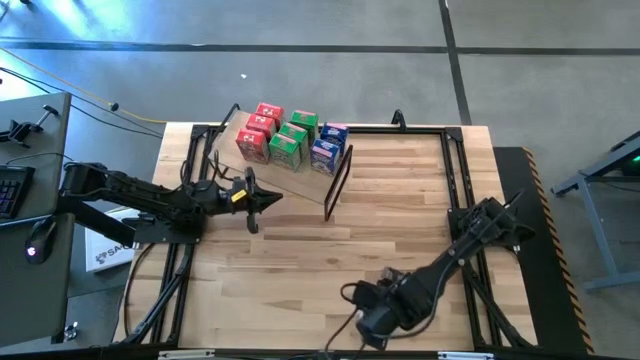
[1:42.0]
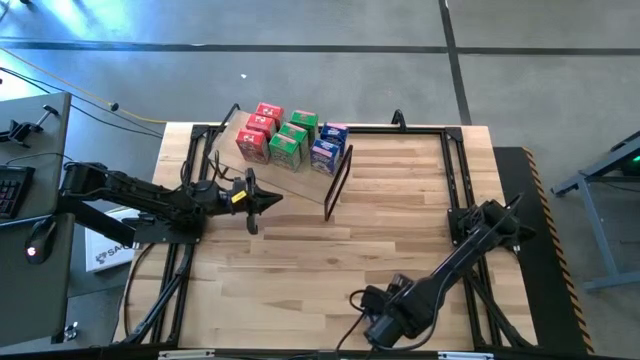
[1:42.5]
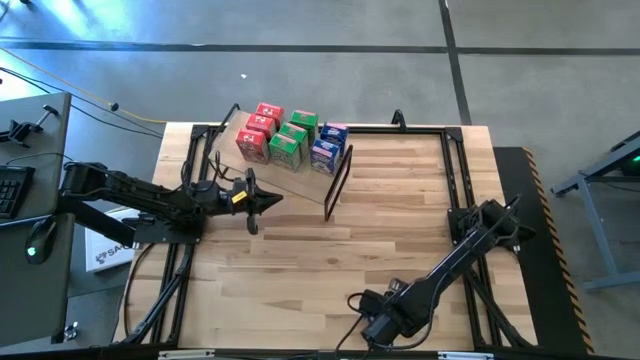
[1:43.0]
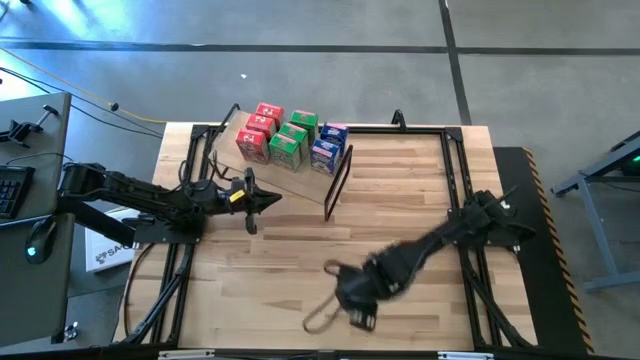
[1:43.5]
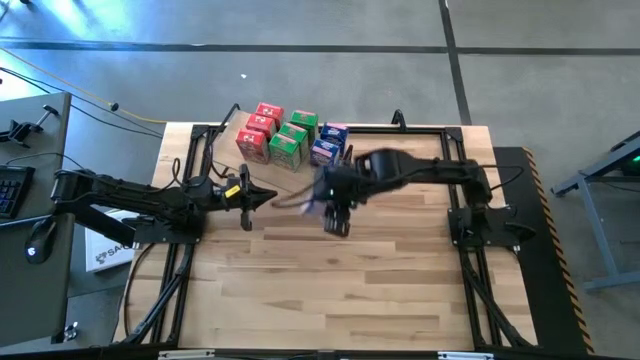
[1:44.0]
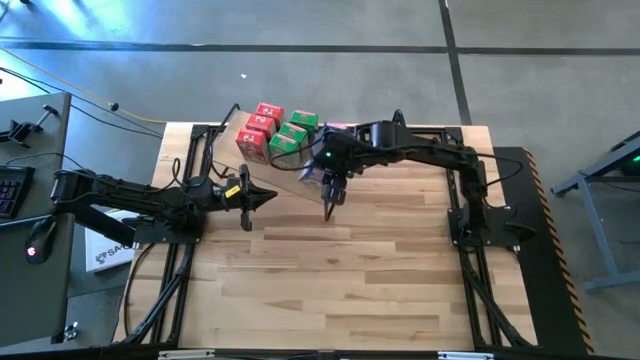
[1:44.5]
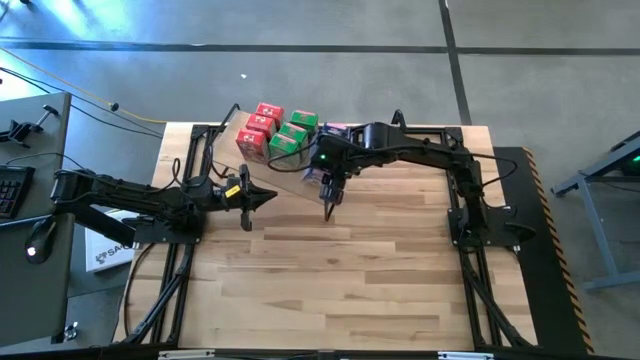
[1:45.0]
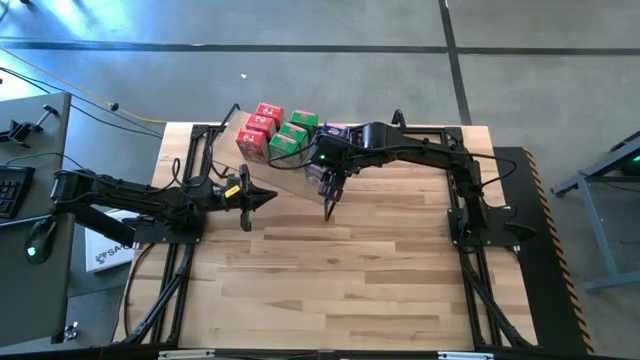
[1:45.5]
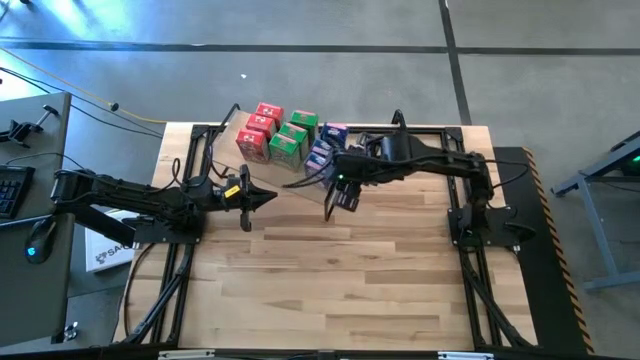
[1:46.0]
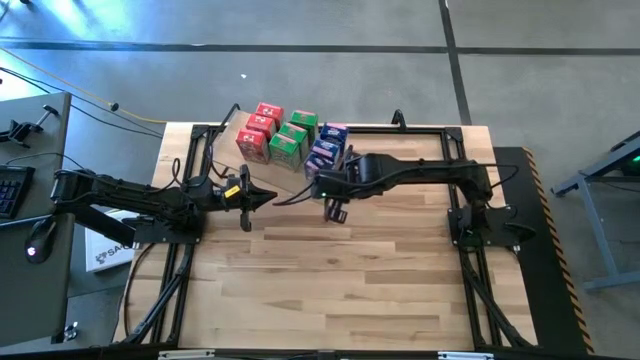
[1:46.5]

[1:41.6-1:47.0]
Task: Stack cereal on shelf
Put the blue cereal box on the shelf aligned with the other blue cereal box

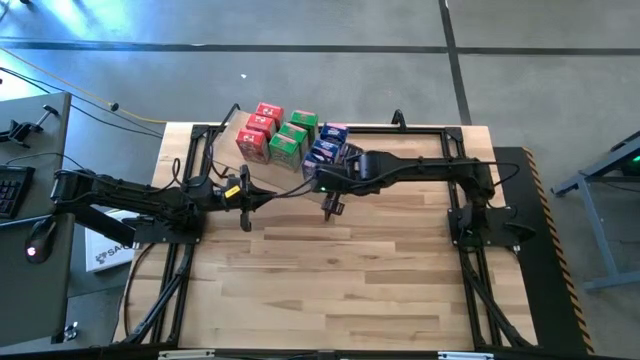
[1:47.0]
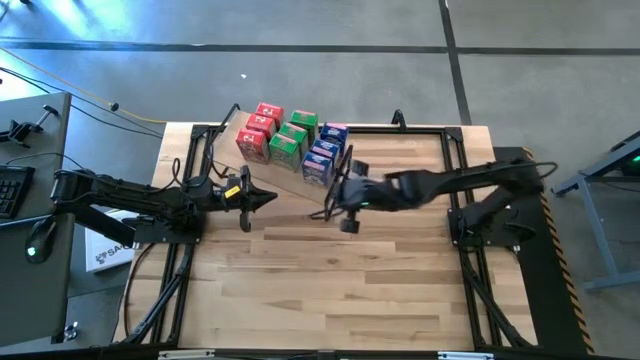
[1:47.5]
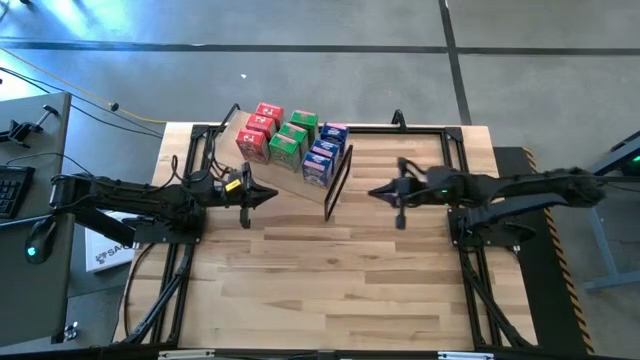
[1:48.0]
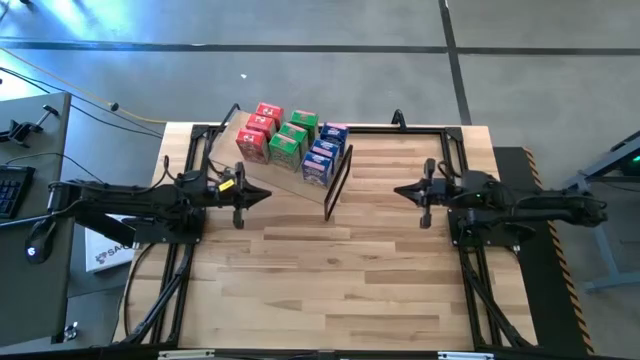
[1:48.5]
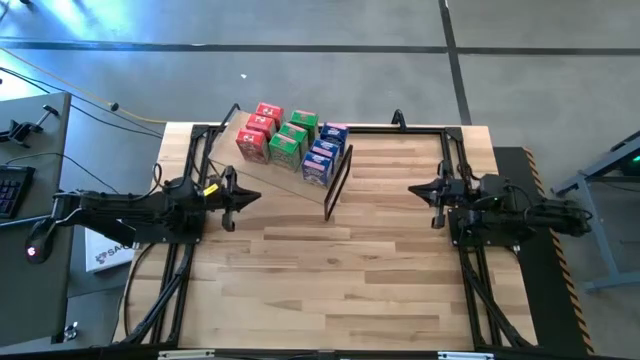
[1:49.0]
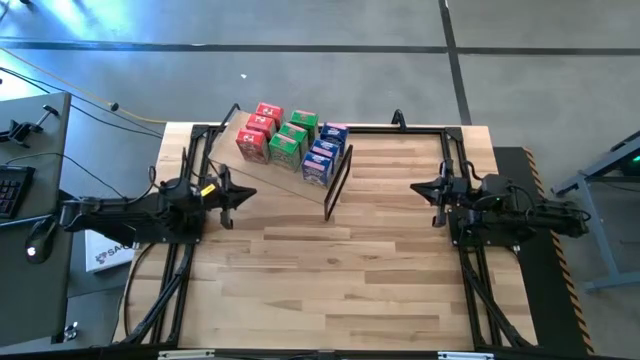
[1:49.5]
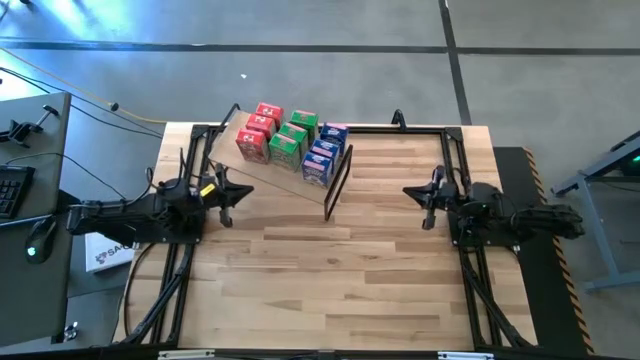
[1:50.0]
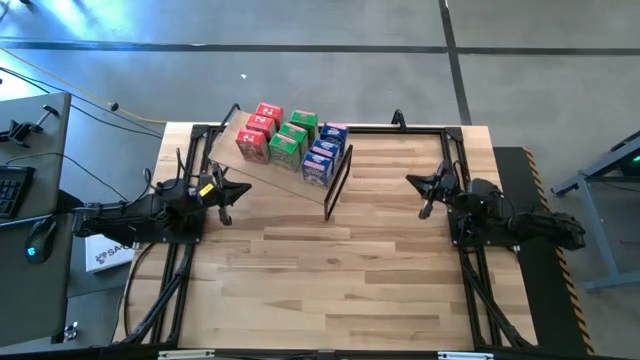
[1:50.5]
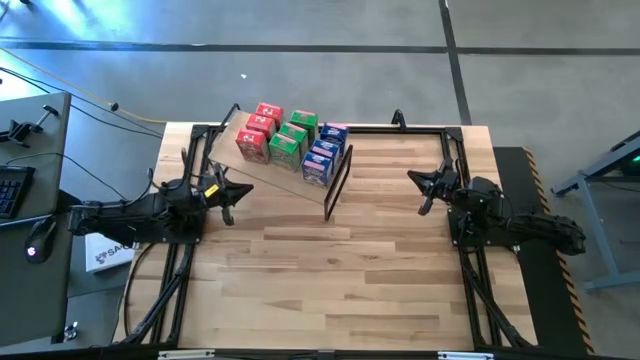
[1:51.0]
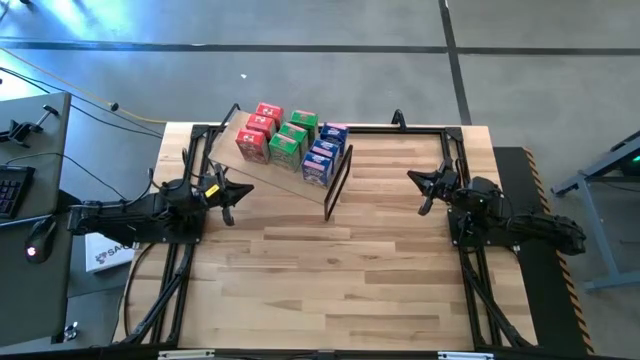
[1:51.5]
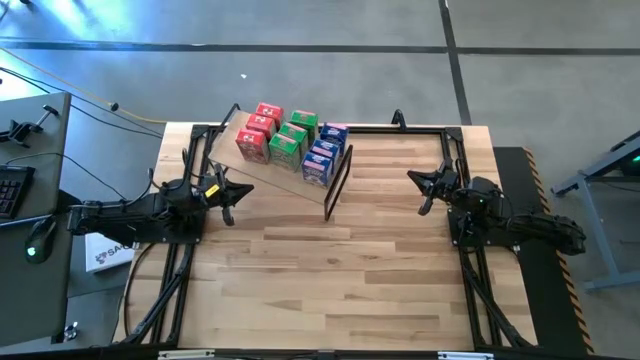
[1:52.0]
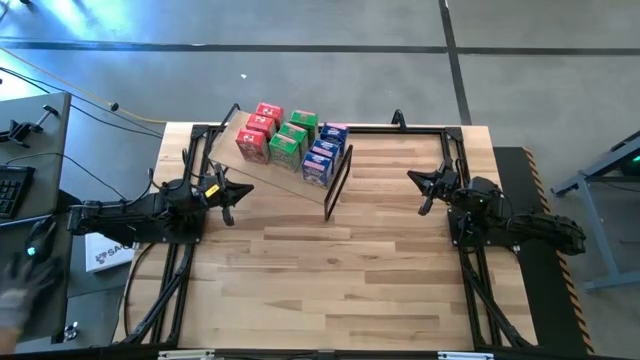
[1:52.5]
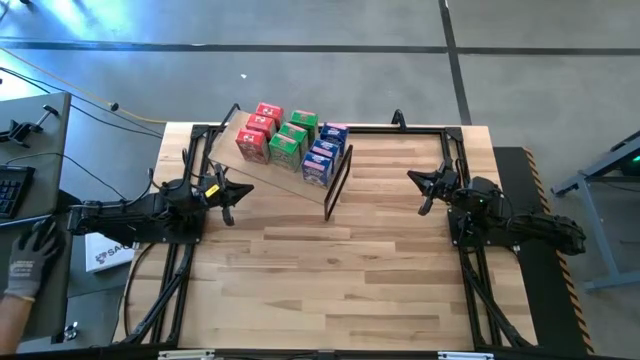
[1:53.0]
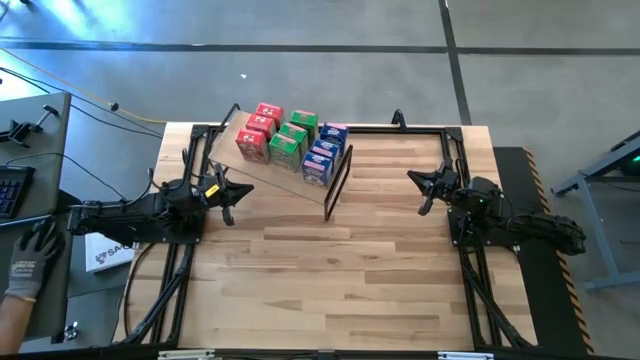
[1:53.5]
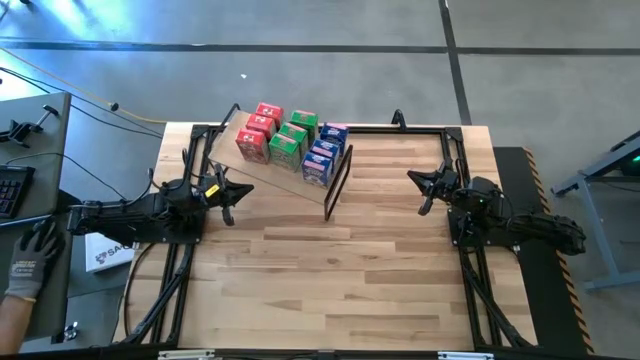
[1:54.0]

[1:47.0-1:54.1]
Return to Home Position

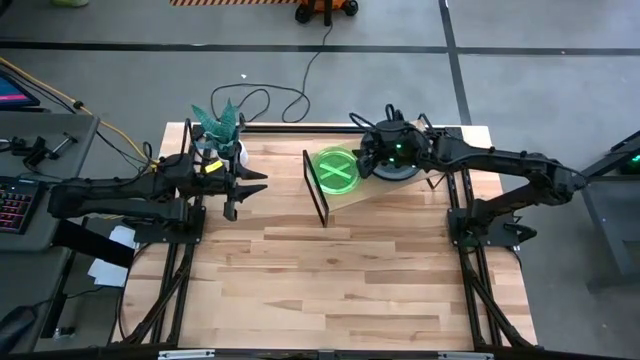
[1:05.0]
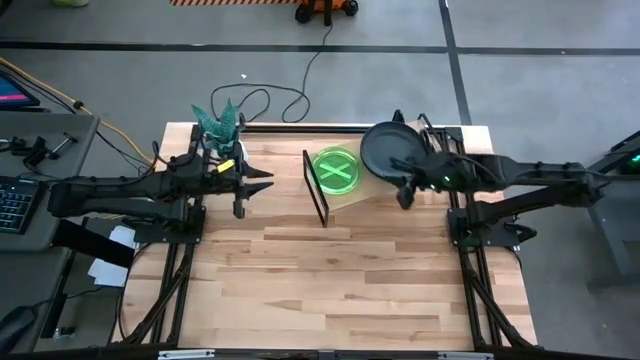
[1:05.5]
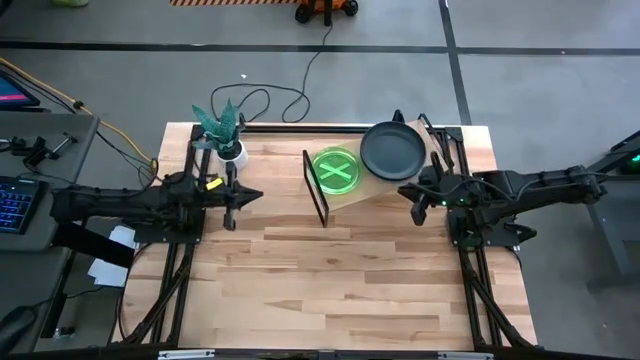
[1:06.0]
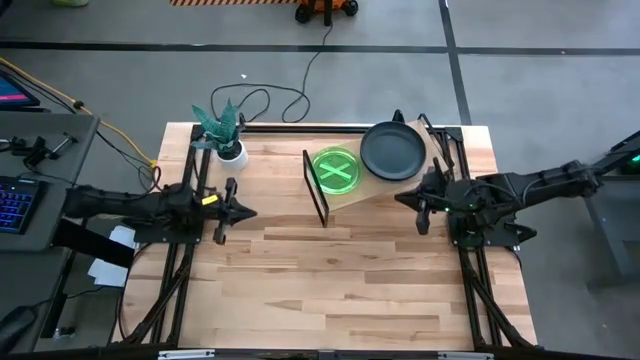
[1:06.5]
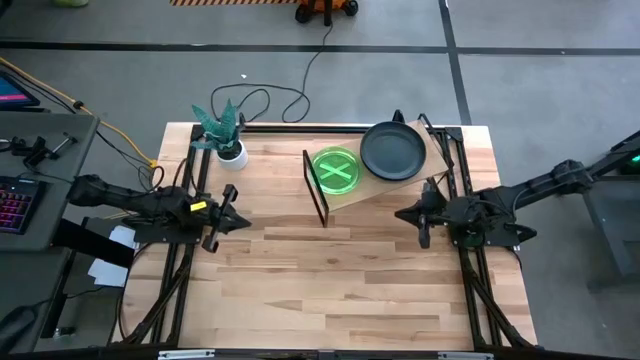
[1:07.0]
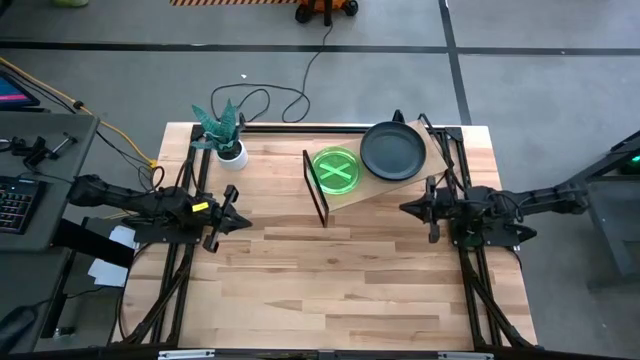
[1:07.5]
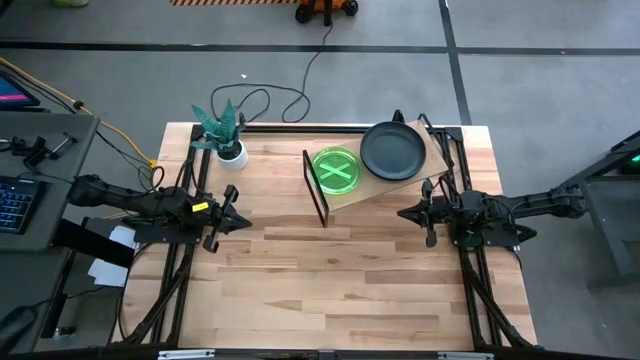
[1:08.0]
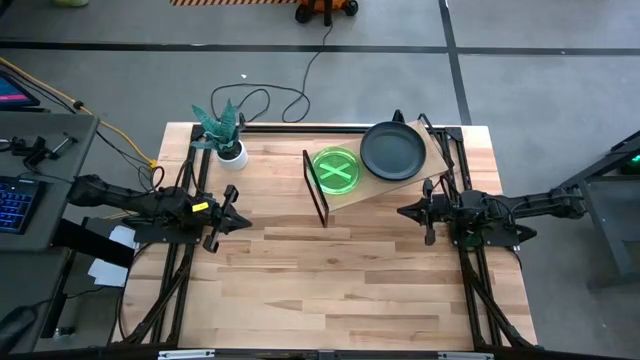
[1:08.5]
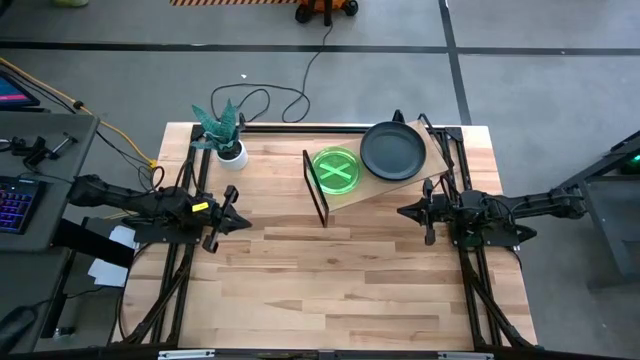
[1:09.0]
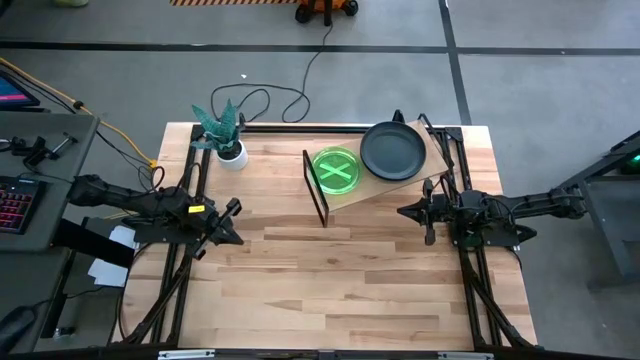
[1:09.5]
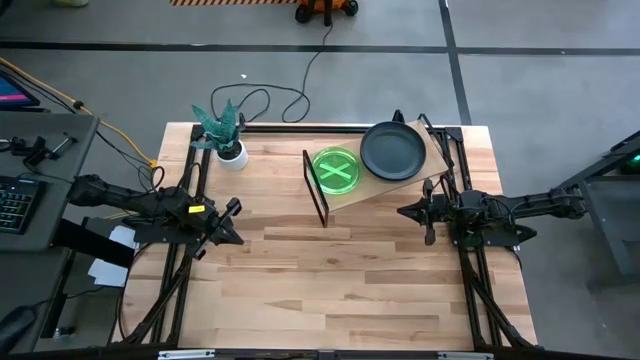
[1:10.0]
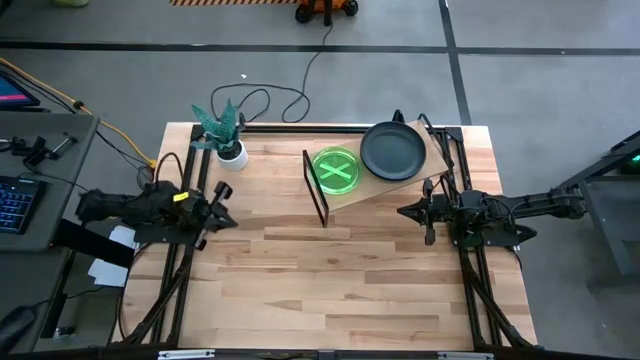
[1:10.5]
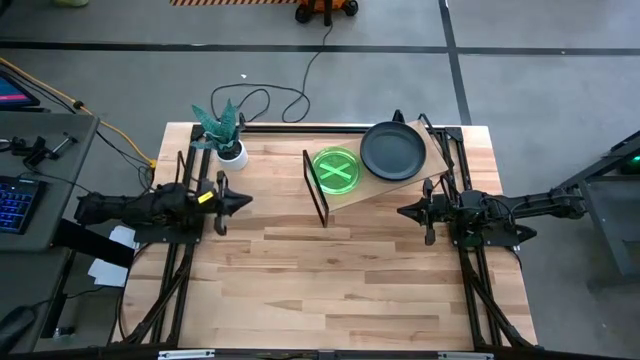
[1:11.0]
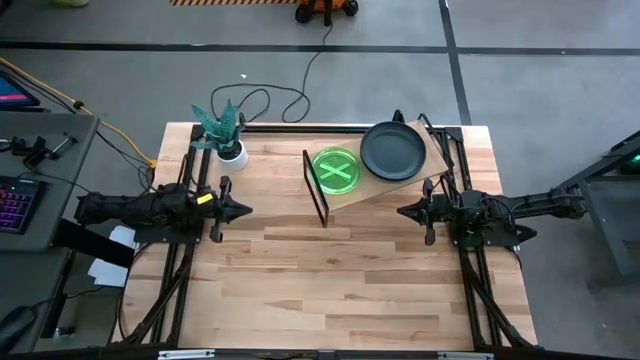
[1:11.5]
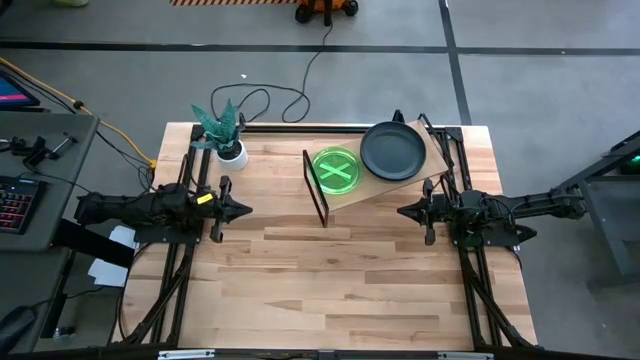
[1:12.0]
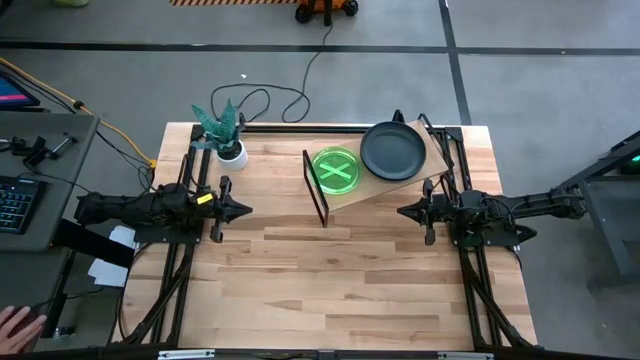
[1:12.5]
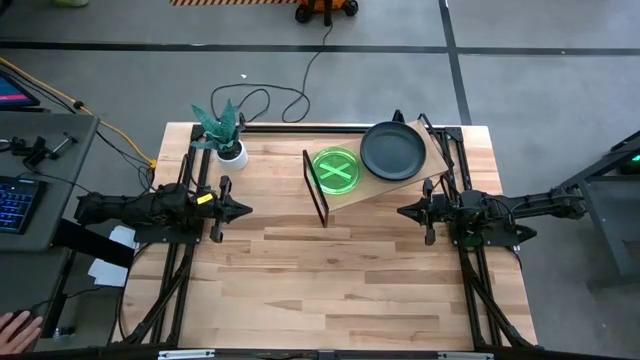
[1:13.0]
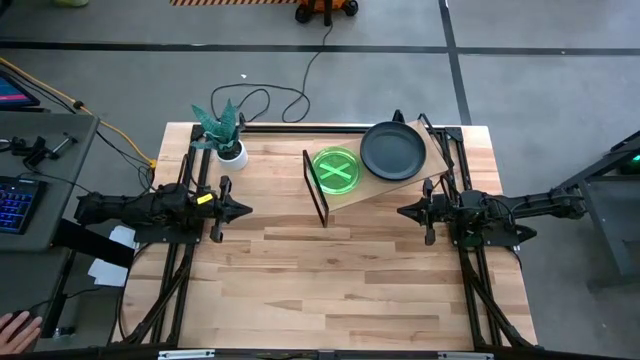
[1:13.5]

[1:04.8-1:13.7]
Task: Place and stack plates onto a shelf
Return to Home Position
